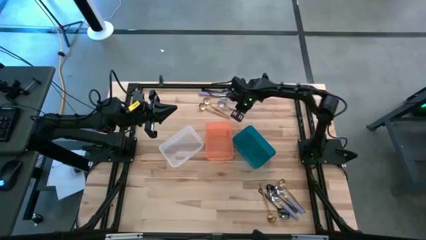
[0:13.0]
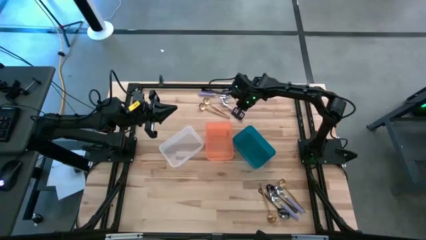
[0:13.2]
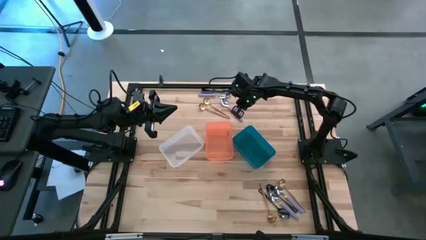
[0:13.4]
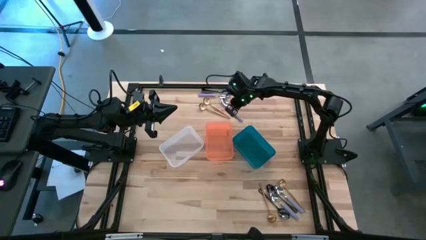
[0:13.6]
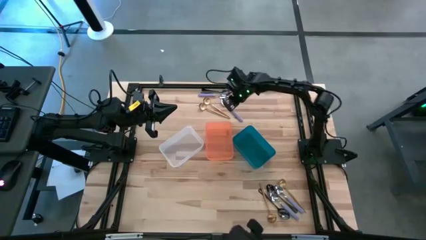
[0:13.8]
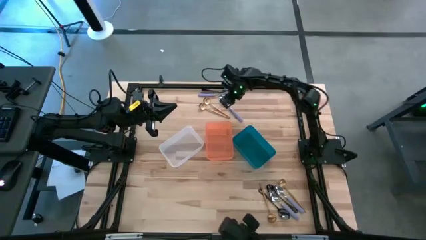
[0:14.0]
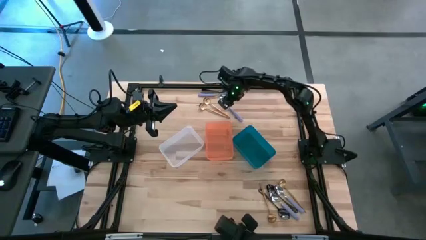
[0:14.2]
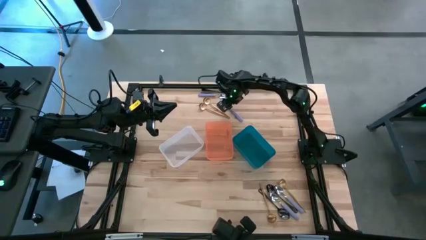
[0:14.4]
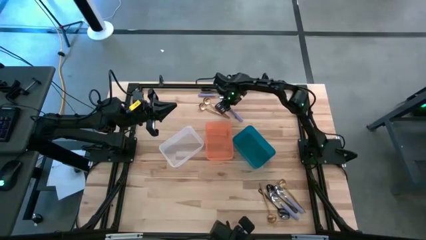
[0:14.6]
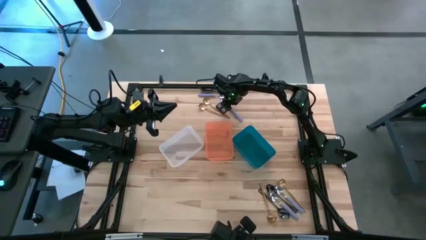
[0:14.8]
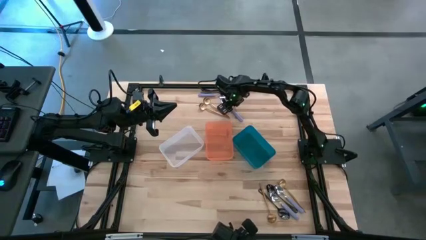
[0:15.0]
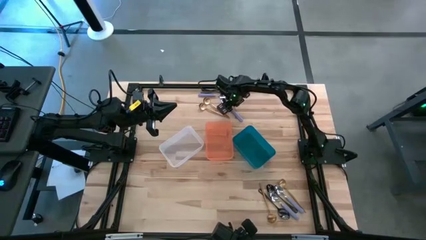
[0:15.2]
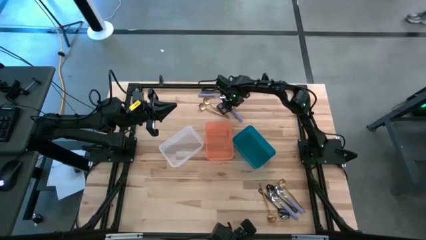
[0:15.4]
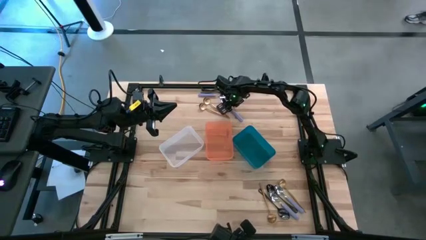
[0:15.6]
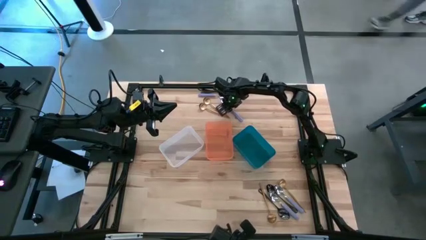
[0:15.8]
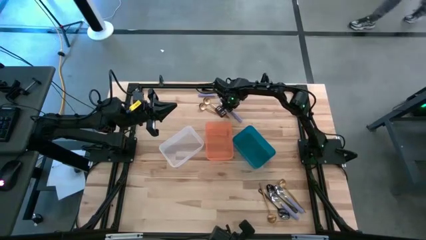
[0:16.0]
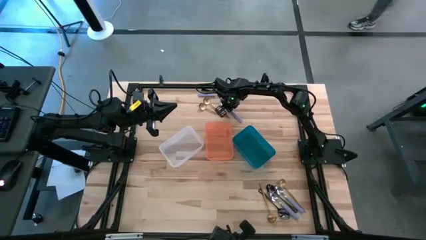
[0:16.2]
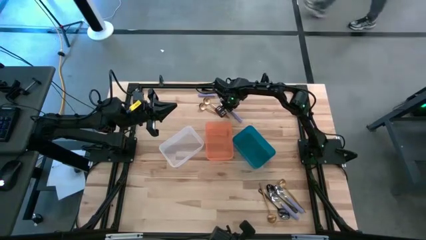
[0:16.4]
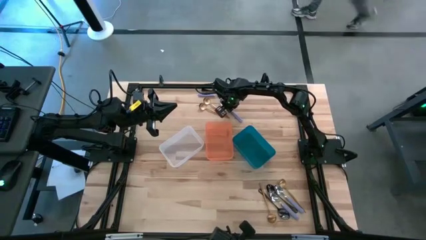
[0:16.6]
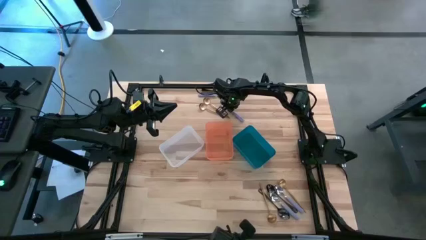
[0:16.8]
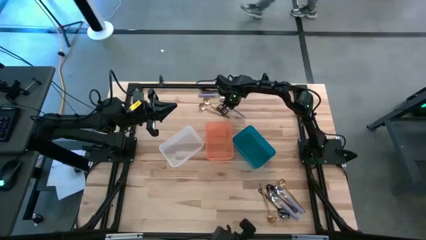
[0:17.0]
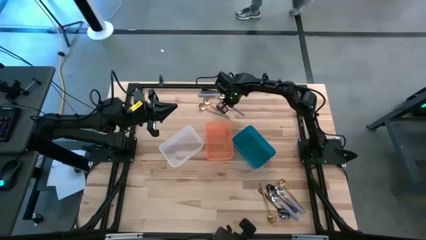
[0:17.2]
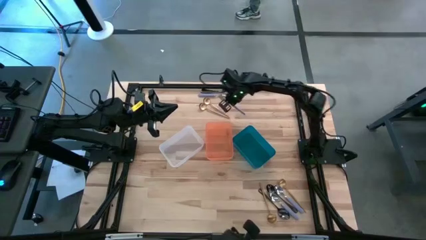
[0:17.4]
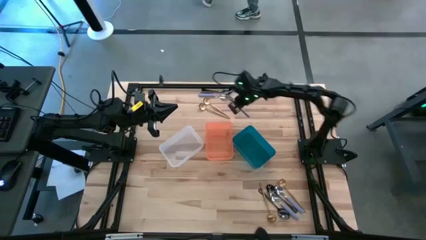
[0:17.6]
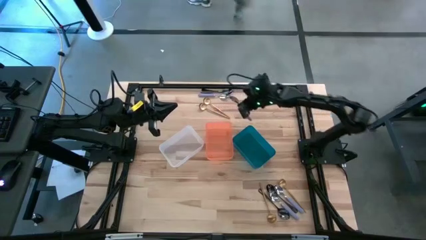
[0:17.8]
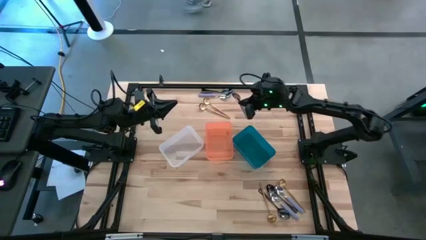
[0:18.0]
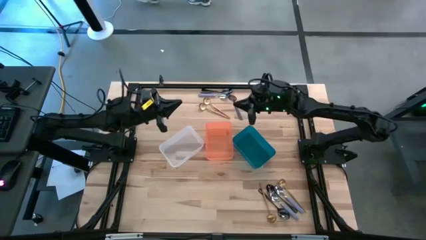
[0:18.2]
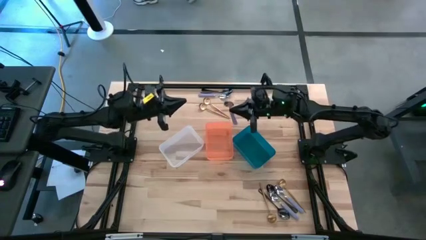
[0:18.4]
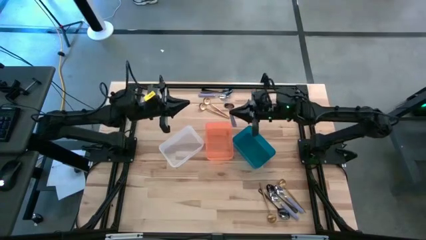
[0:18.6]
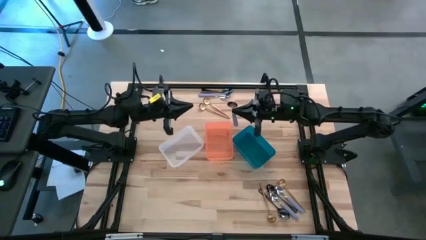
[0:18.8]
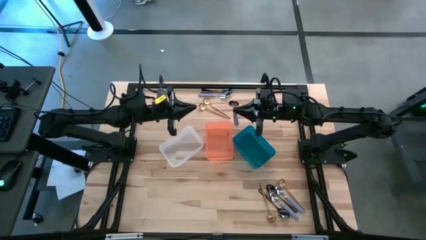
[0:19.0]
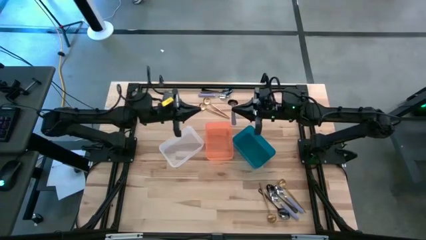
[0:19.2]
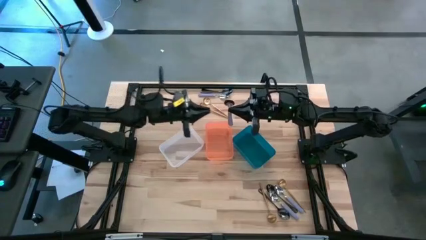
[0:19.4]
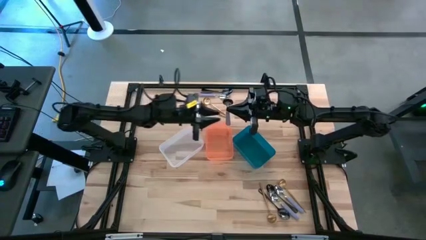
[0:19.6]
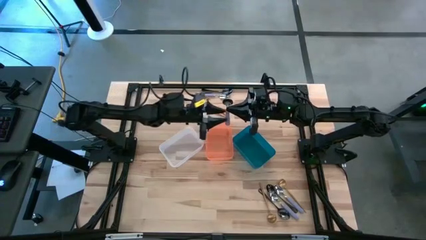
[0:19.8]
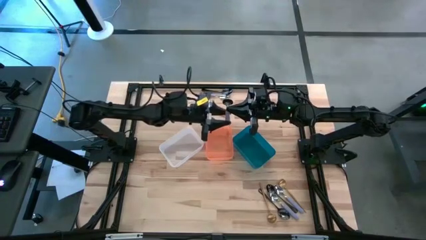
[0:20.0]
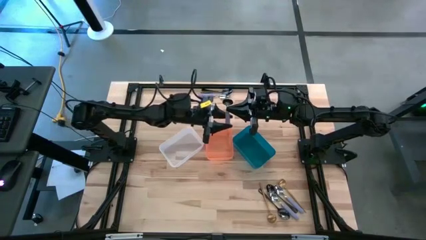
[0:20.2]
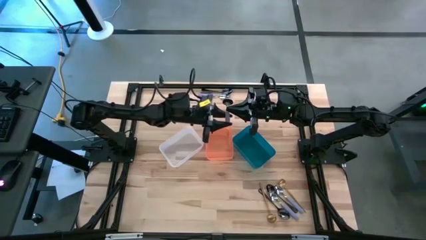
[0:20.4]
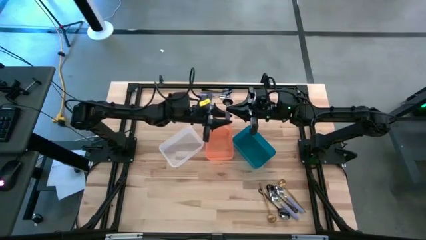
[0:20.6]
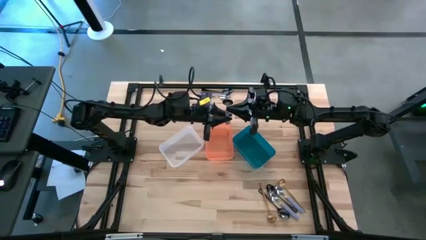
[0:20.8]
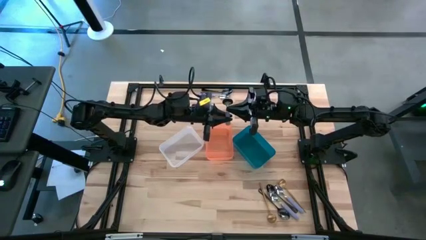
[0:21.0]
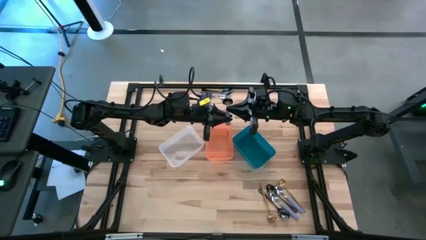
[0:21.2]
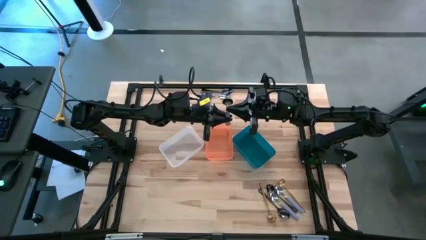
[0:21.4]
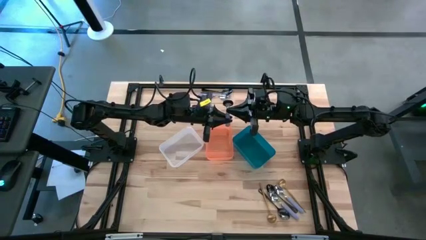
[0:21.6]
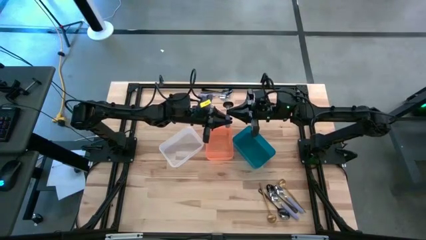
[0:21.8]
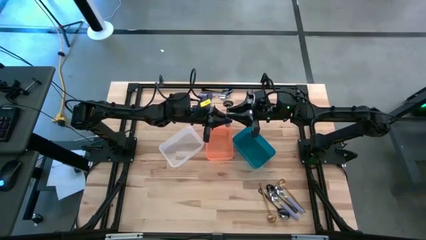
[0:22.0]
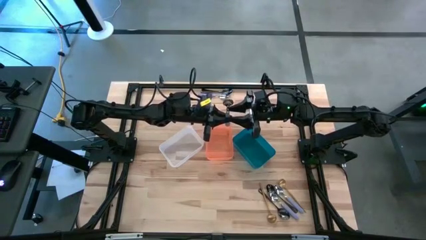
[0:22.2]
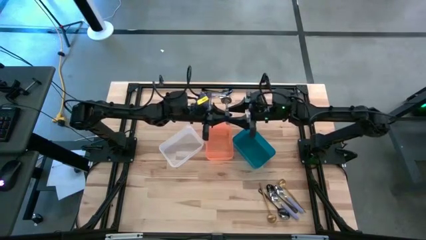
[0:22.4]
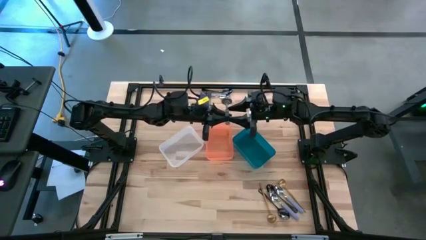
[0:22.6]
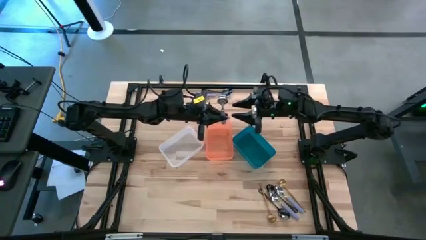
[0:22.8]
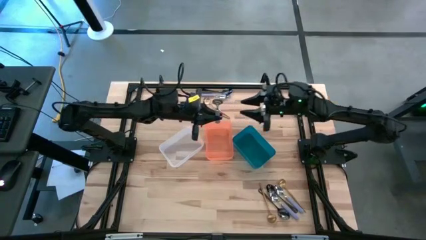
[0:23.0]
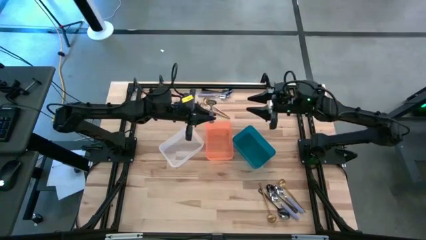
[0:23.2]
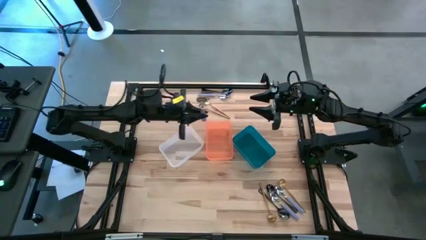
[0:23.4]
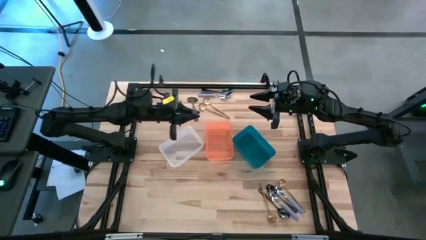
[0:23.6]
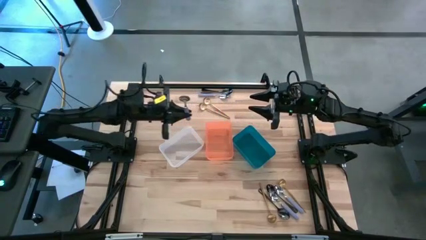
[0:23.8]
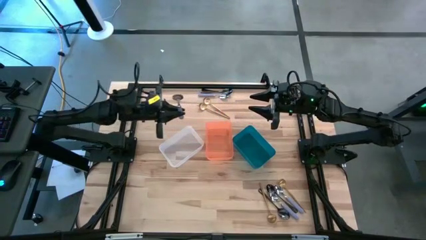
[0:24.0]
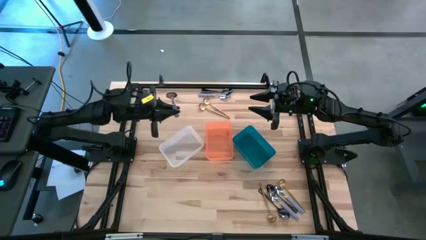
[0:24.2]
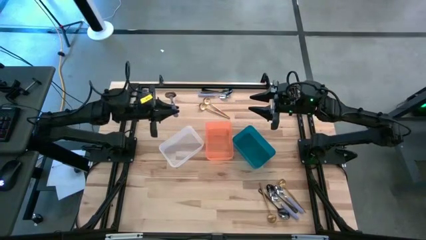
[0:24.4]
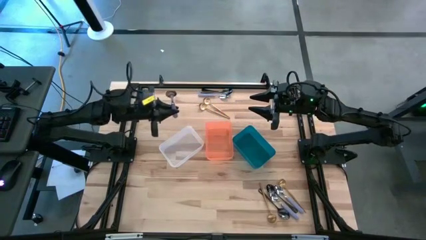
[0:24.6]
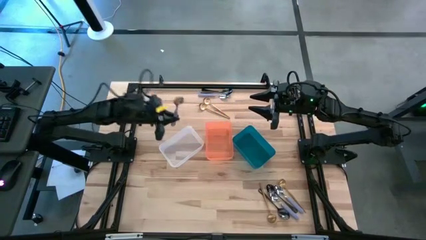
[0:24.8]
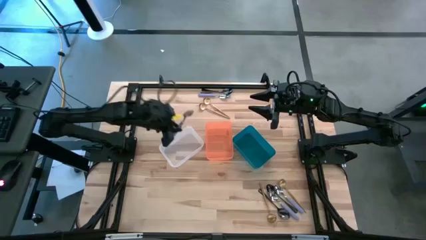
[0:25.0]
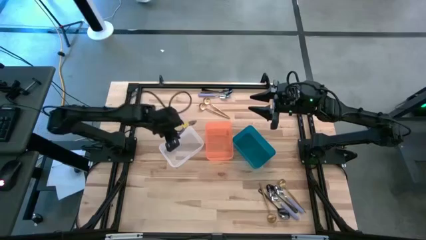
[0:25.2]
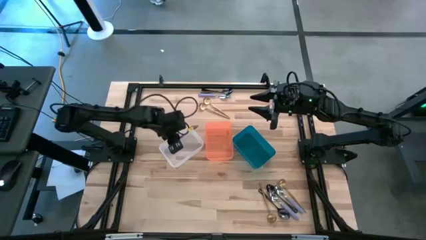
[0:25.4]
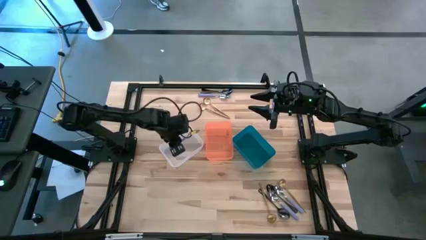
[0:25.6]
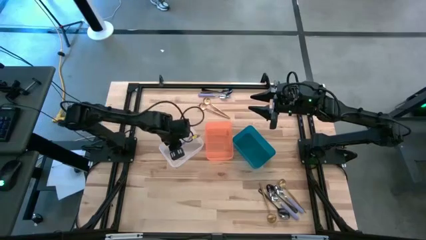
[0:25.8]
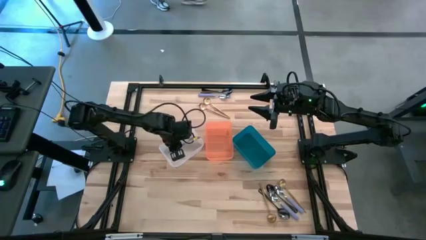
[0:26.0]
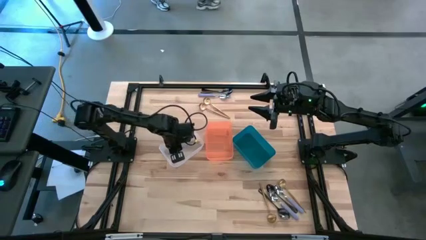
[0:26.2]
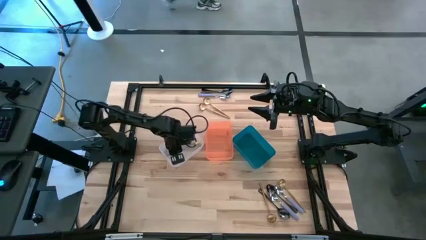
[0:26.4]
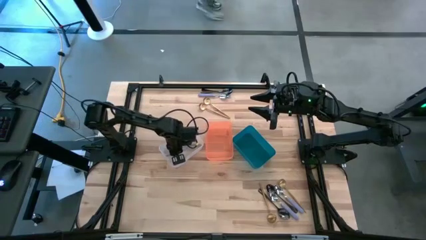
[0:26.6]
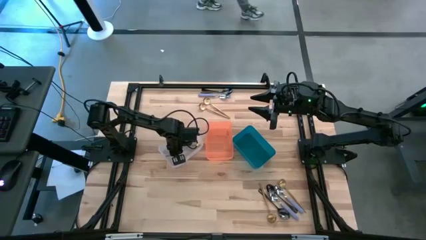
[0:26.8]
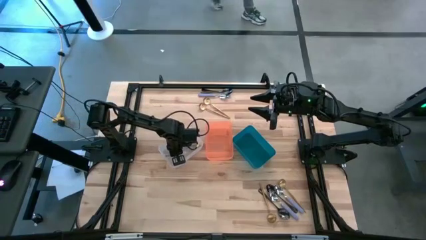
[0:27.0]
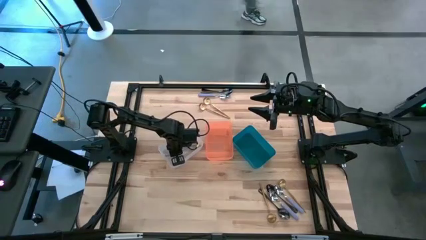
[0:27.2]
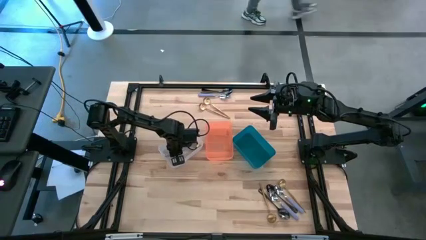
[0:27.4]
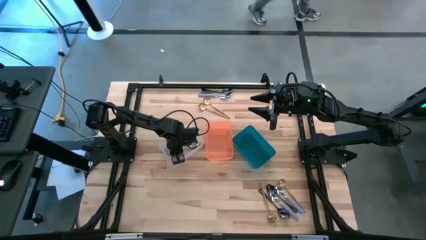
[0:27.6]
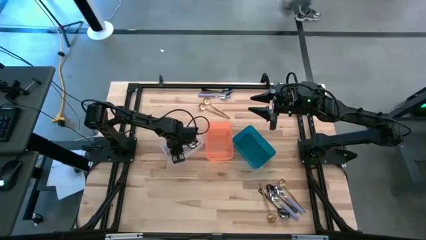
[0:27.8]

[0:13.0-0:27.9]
Task: Sort silverware by color (type)
Put the purple spoon into the white bin
